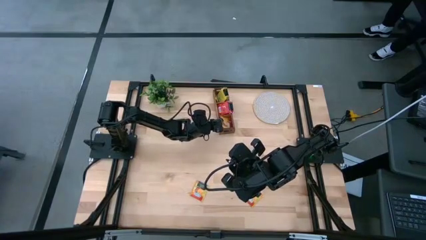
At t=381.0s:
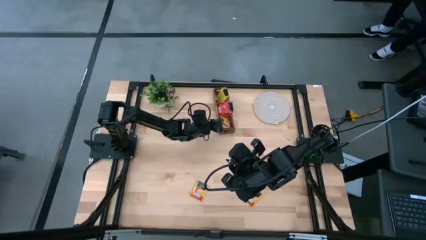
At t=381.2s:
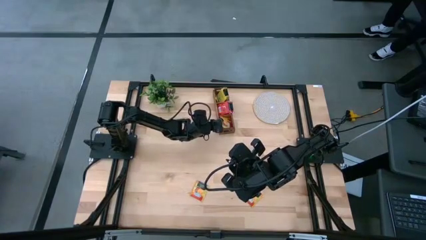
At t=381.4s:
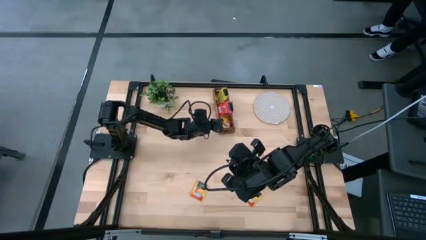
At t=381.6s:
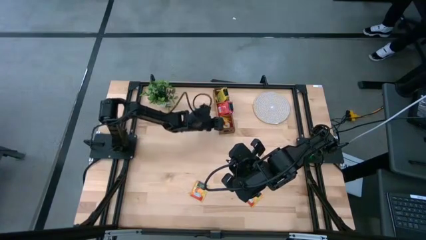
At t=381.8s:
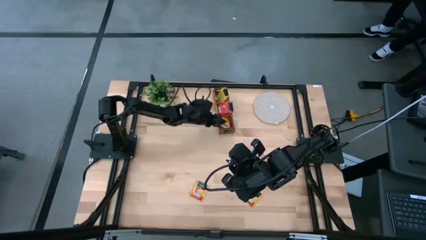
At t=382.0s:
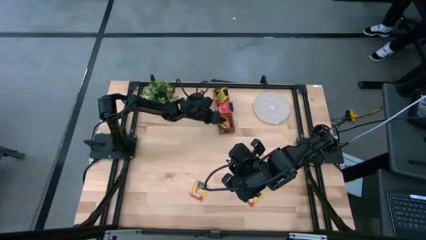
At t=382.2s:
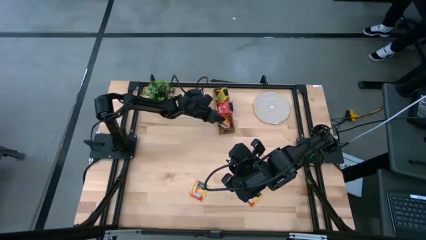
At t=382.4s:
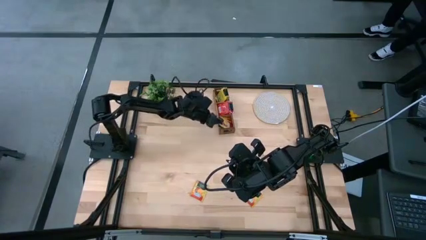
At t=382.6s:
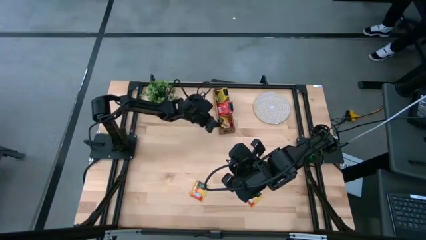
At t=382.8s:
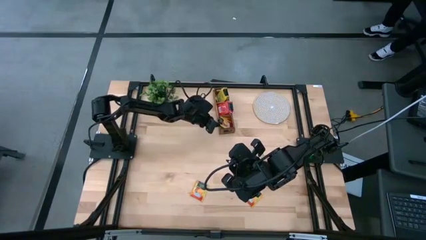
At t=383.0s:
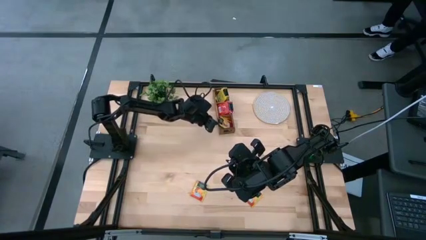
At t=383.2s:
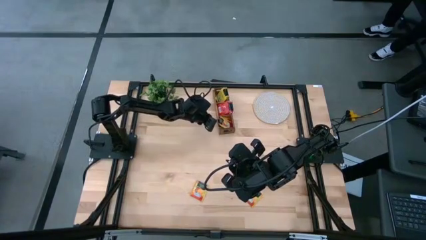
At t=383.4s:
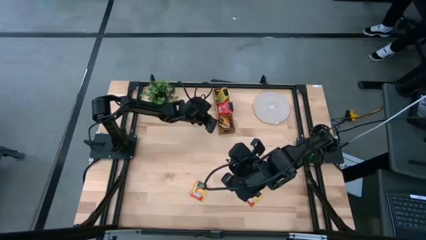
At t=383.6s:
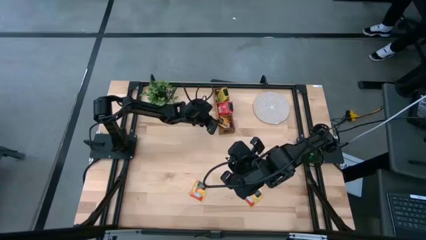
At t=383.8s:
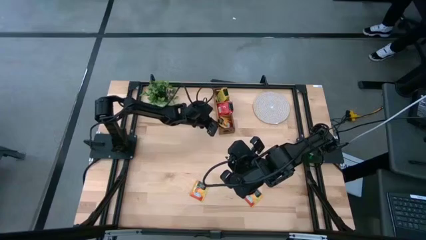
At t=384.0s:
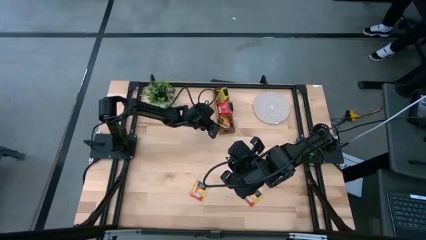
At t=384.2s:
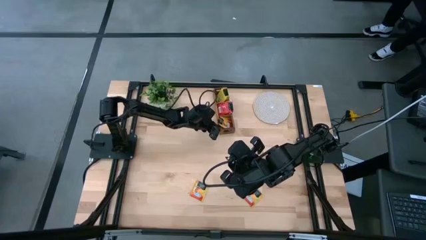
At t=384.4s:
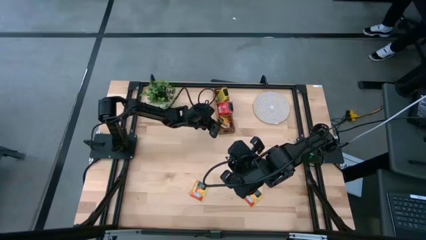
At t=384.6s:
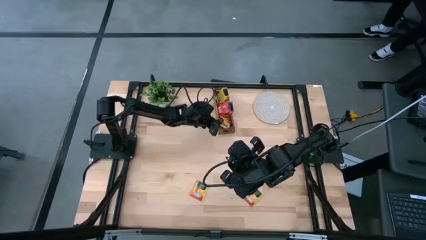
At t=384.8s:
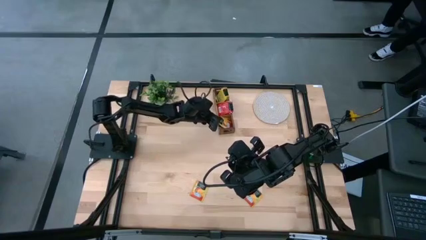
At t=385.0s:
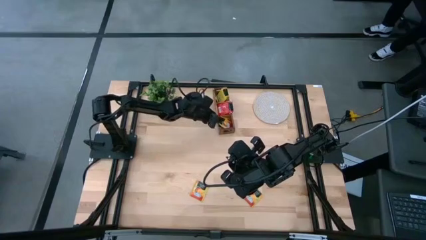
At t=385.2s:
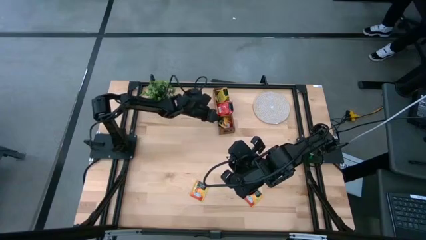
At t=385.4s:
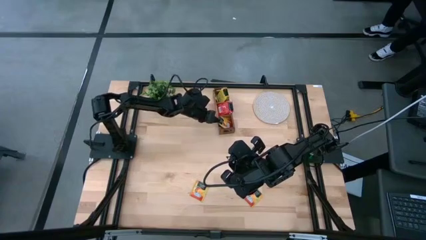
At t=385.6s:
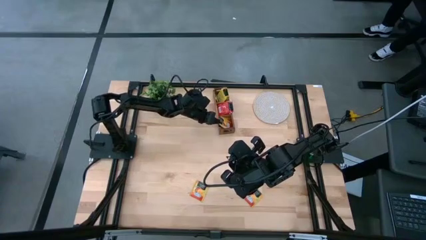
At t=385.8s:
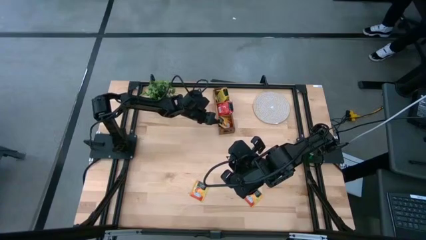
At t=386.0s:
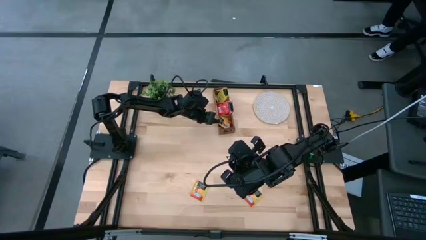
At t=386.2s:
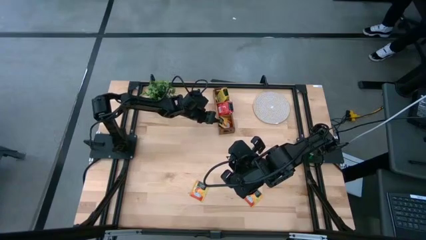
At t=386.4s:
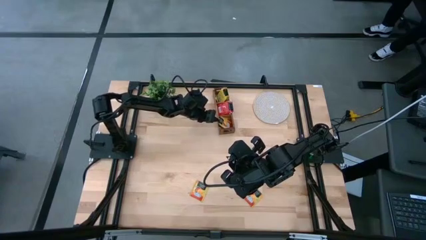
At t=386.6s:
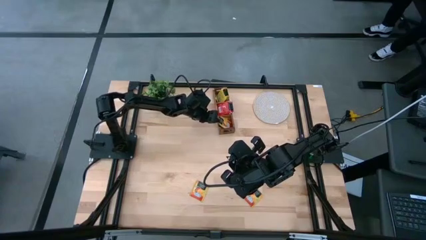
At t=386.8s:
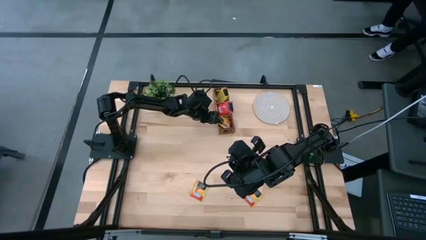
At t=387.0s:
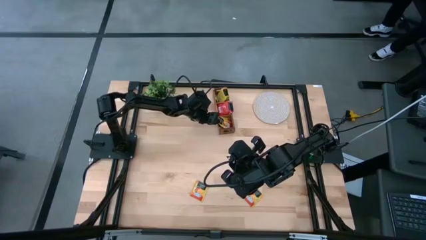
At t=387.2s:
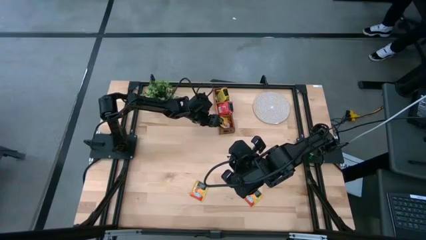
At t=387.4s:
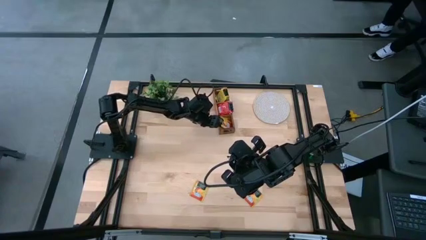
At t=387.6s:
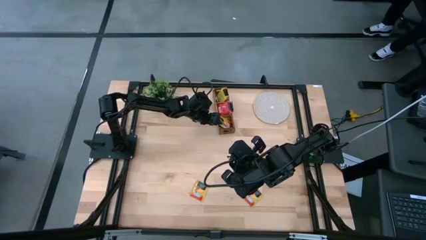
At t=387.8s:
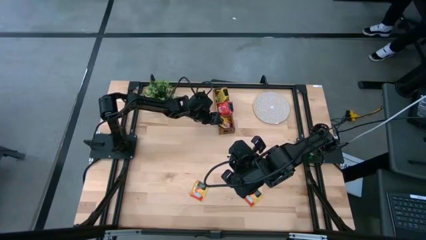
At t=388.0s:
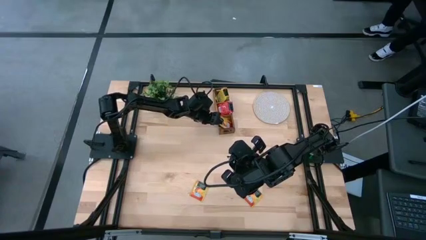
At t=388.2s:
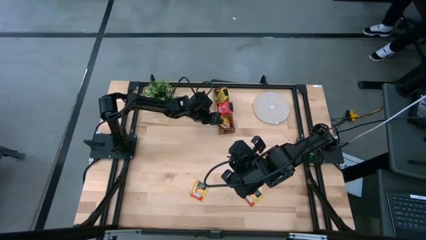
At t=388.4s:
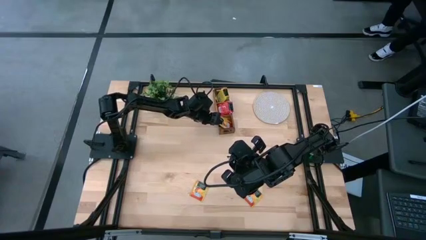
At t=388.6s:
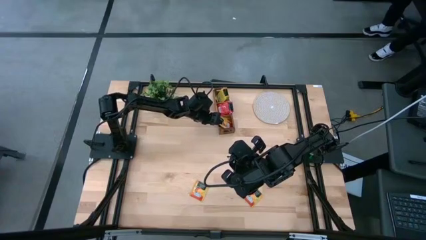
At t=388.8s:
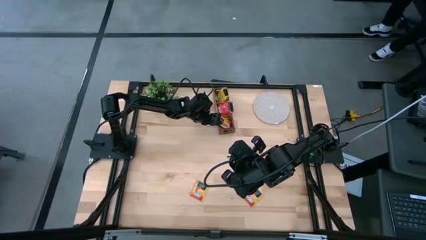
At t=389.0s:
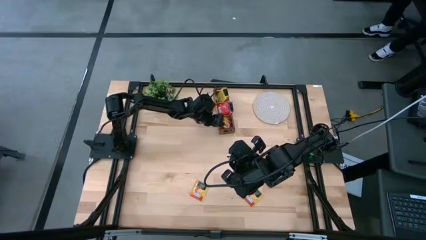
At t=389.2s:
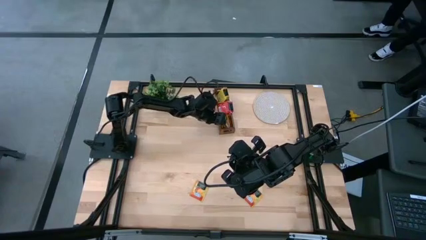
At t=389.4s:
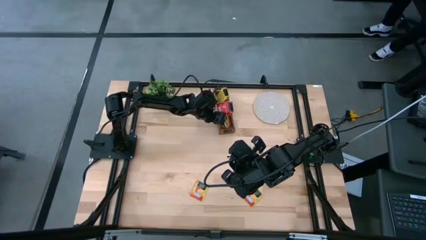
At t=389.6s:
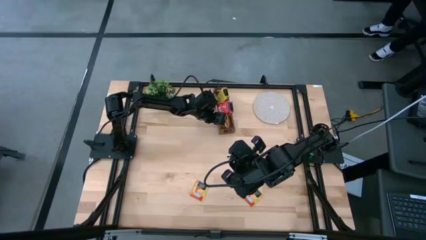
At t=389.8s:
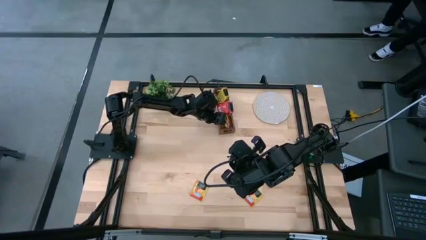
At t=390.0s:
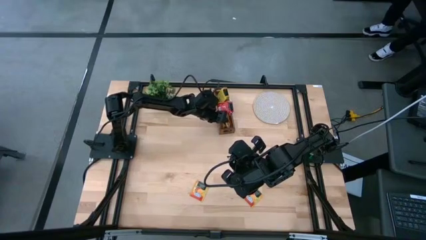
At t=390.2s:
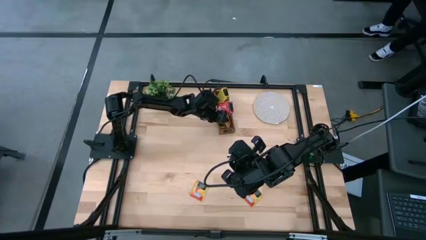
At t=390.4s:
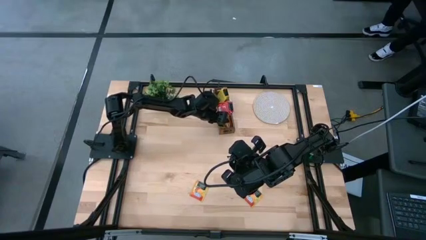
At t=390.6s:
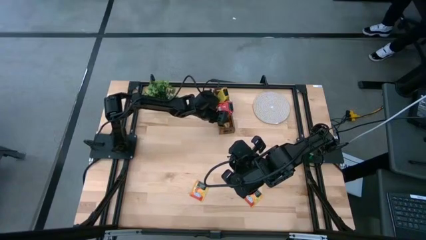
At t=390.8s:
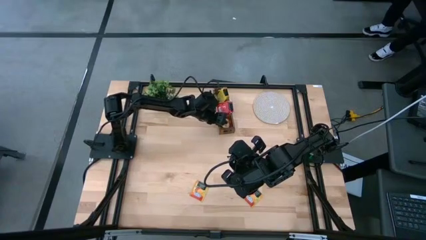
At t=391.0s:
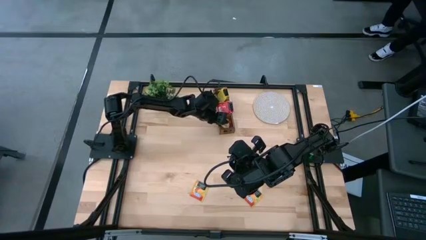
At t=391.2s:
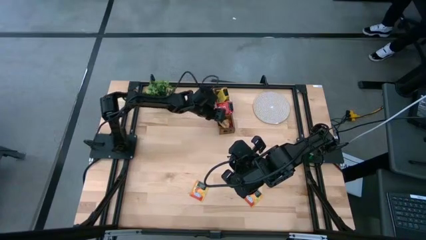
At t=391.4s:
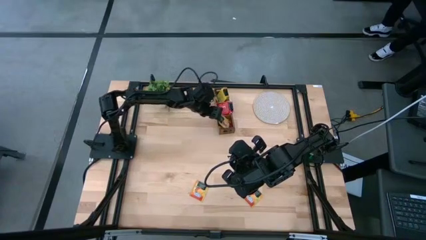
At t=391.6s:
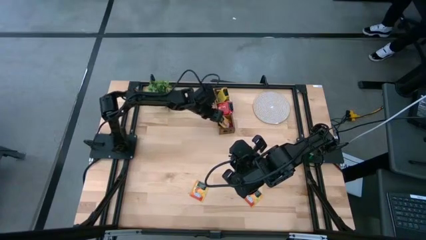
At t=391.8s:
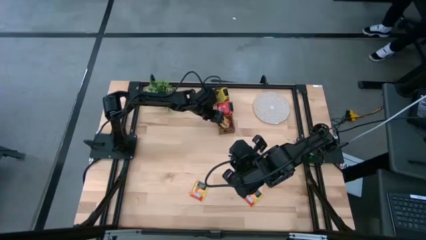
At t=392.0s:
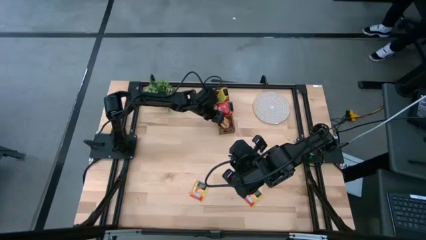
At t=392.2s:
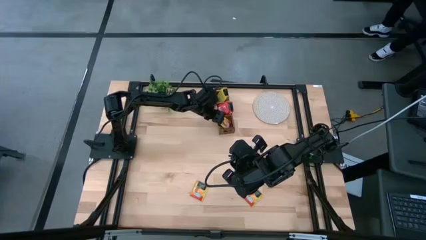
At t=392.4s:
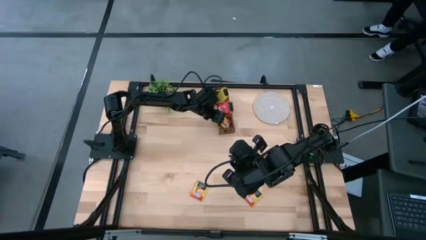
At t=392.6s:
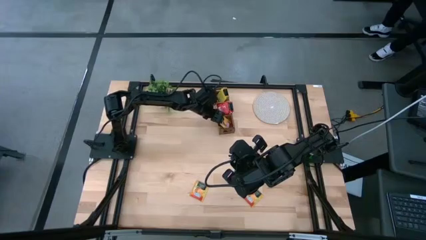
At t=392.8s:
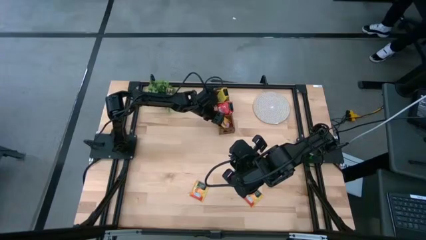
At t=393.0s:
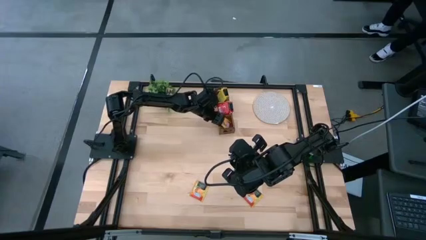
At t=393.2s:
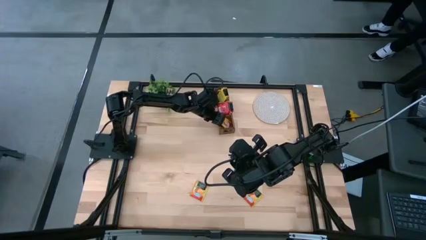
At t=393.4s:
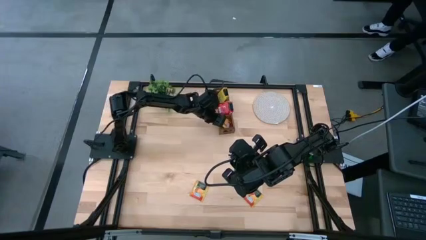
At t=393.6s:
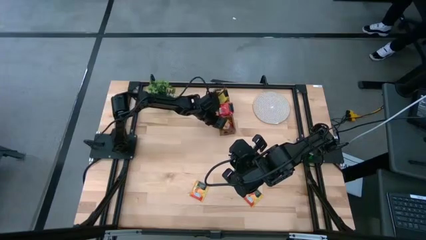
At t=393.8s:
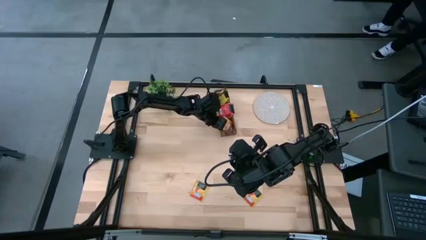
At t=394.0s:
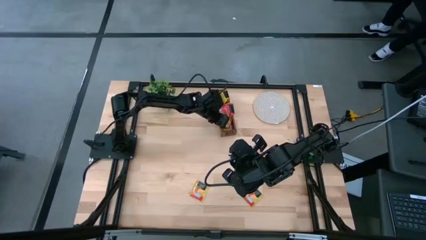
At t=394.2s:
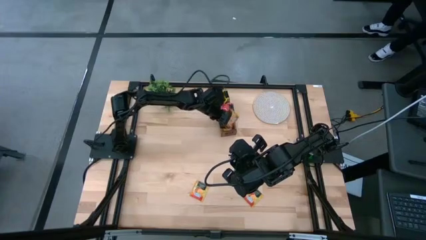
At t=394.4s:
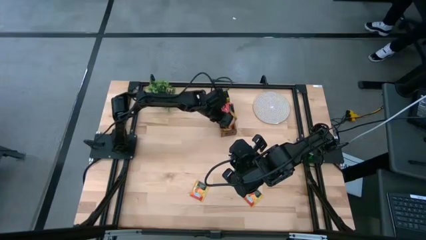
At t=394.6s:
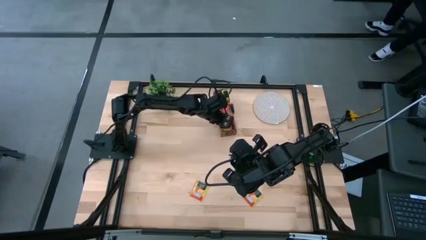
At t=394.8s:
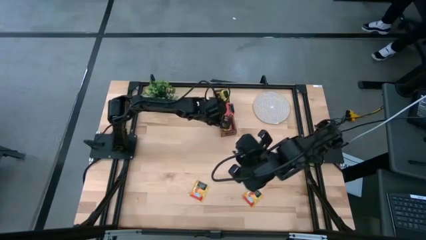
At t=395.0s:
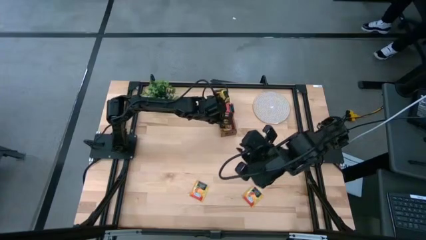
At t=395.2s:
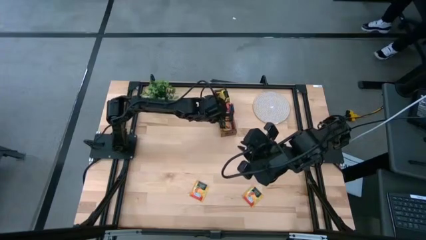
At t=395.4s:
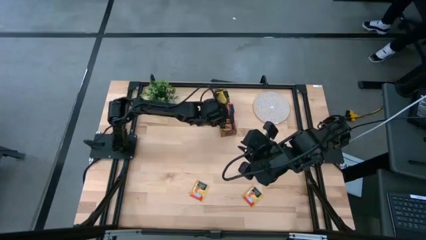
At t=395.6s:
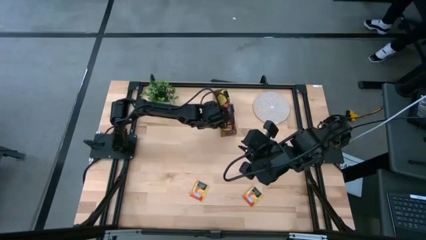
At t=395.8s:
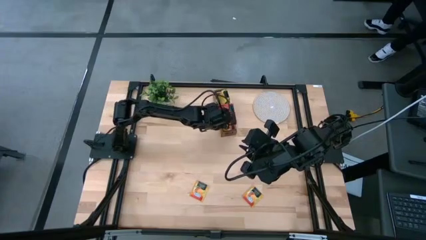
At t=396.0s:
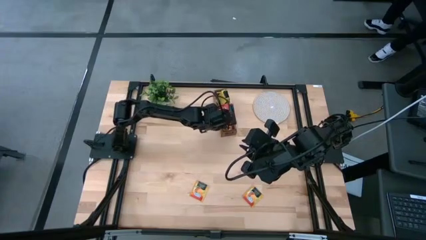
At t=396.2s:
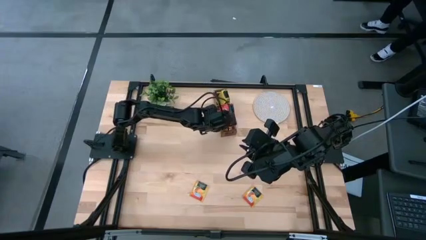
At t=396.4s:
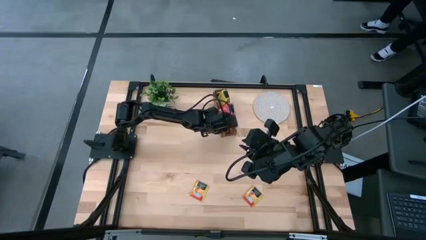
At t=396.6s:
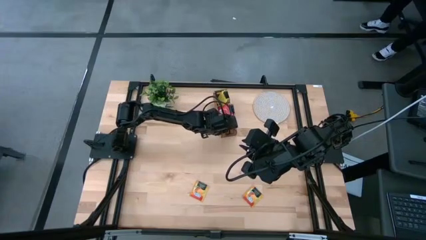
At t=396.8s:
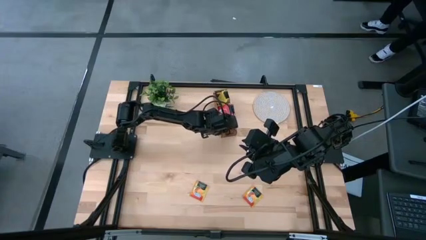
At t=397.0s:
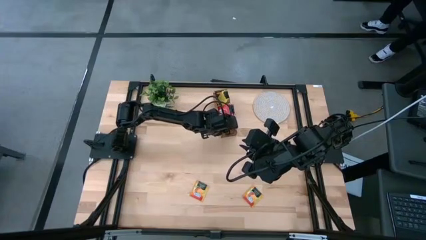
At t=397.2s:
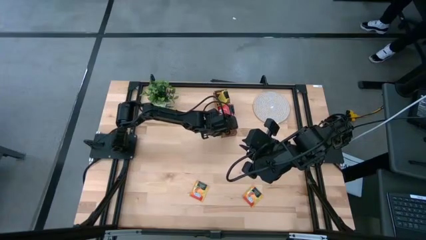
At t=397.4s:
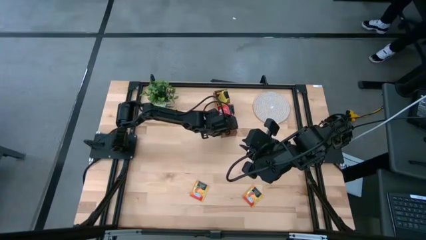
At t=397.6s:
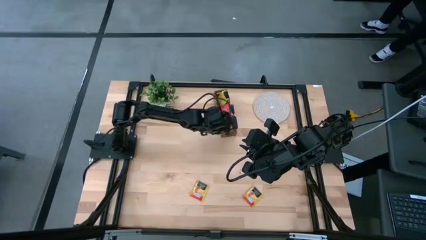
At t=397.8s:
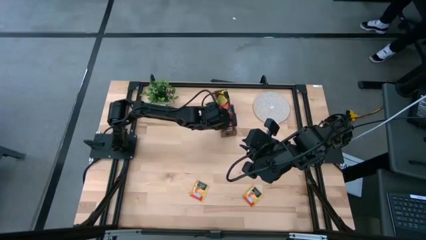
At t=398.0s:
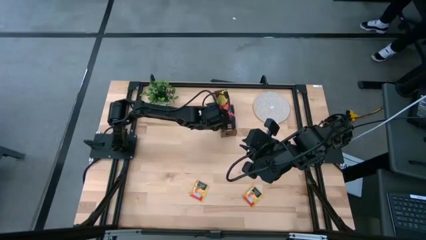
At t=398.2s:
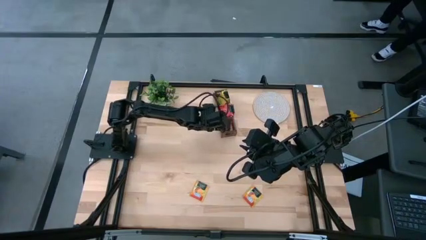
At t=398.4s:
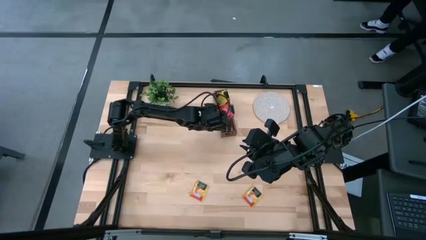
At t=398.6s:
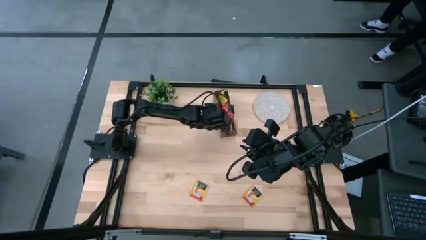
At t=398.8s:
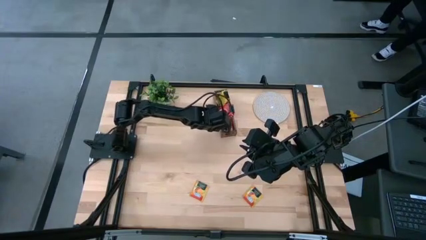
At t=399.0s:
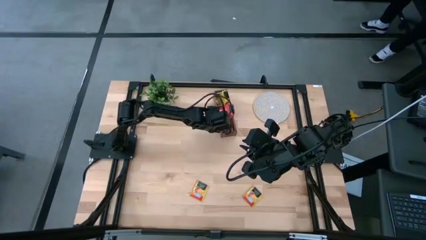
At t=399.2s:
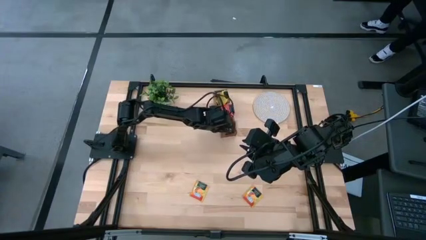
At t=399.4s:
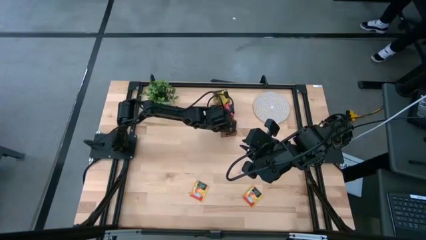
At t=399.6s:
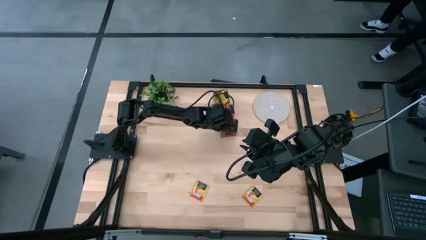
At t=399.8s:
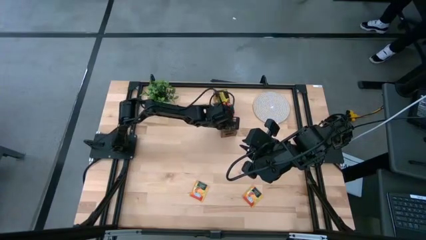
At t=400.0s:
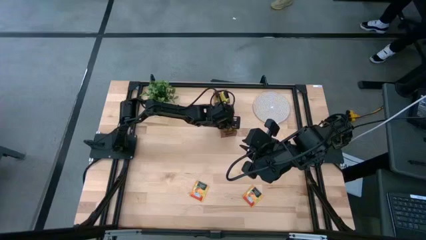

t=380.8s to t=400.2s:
Task: Pick & Place Tea
Adjust the orange tea bags in the wooden organizer
